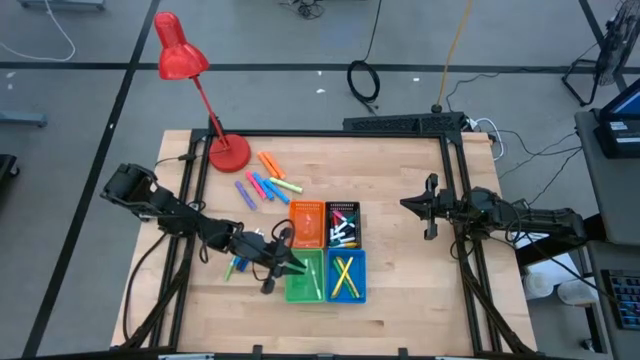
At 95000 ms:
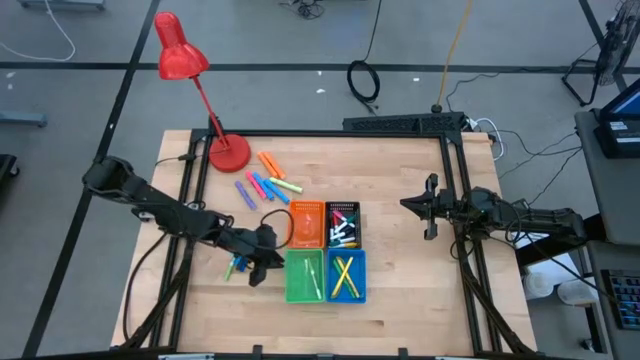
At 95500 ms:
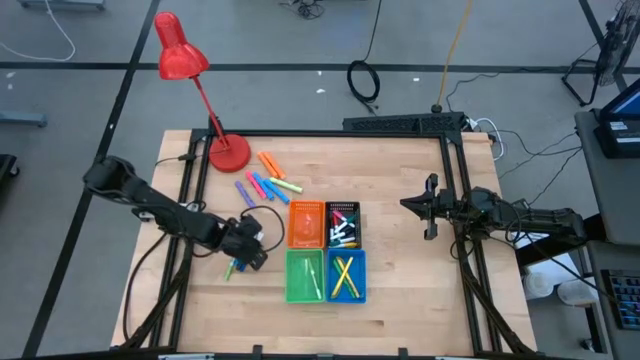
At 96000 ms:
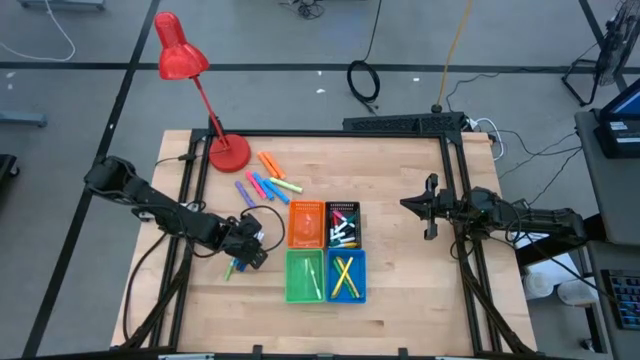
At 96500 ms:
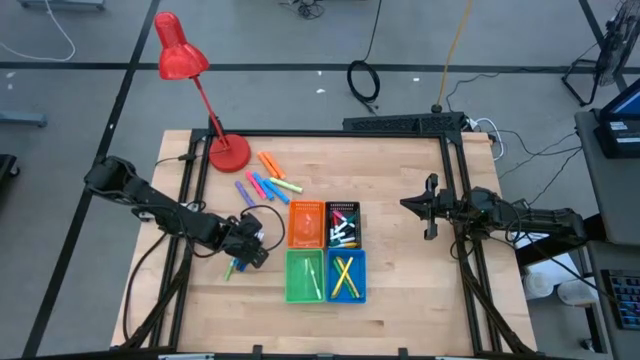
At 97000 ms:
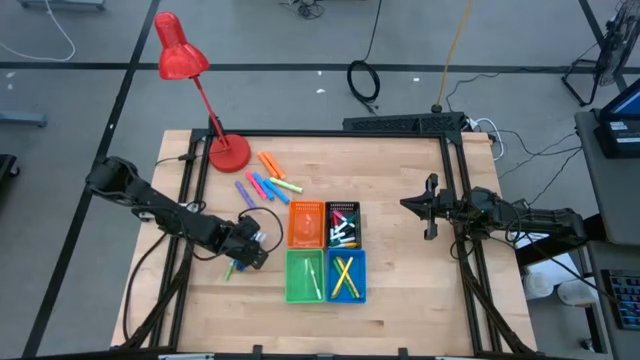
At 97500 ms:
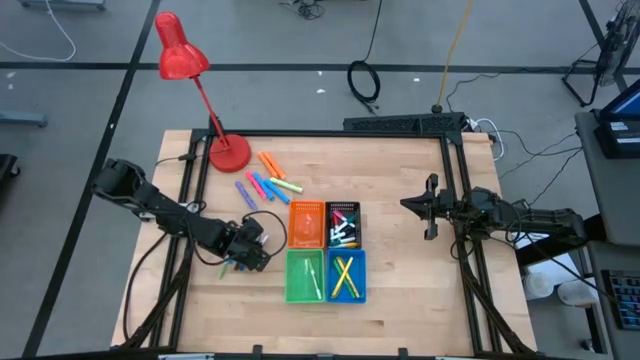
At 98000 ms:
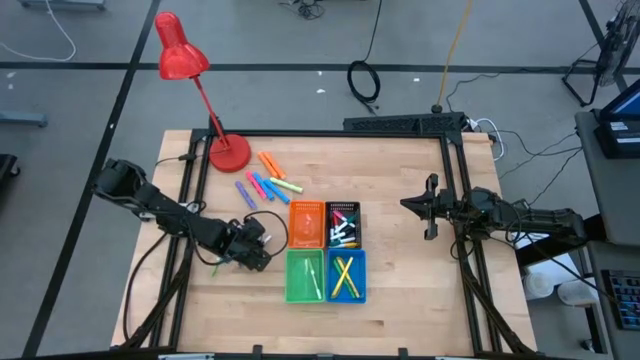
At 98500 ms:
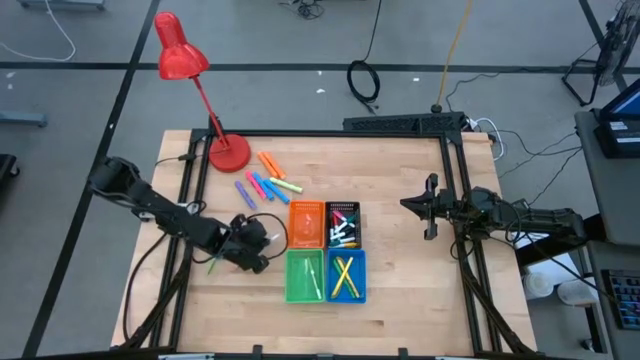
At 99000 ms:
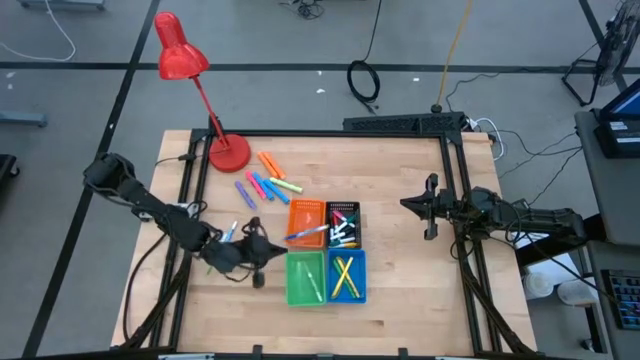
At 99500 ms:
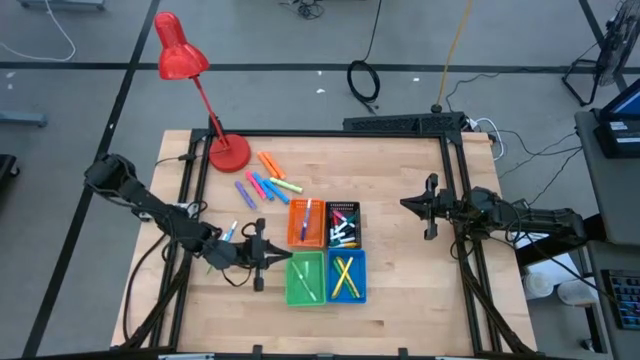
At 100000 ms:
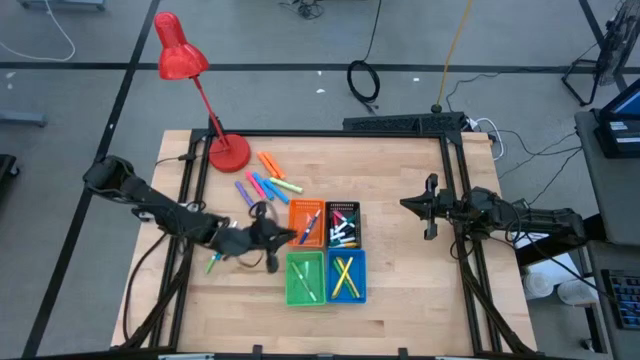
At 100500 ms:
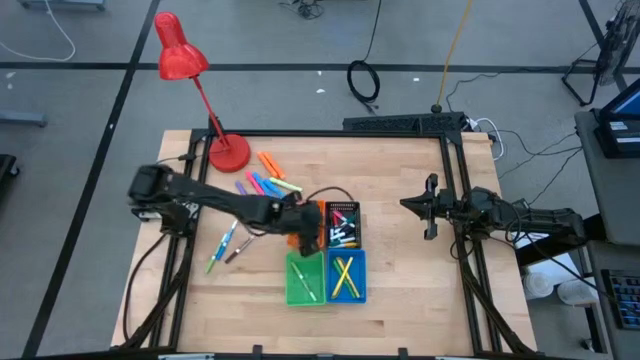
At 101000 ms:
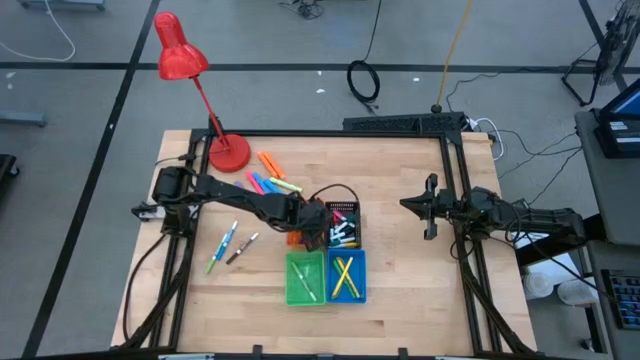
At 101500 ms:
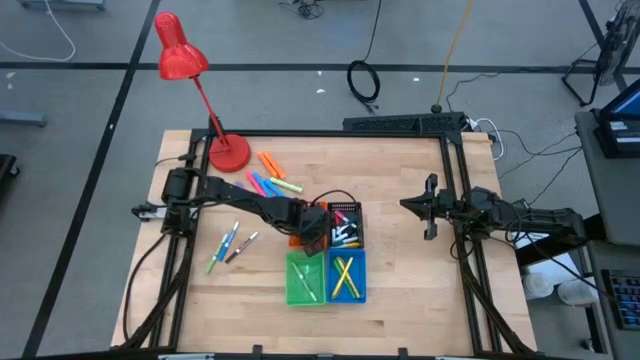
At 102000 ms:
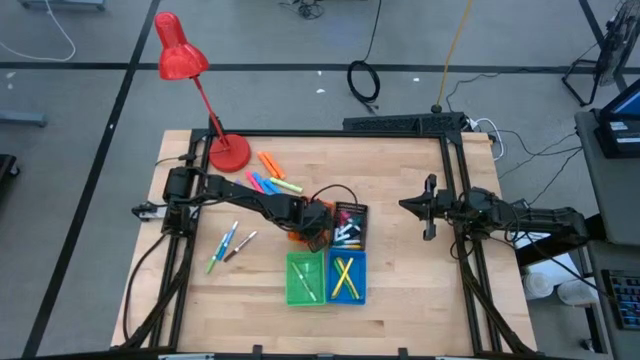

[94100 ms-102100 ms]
Task: Pick & Place Markers
Put the blue marker pen into the green basket

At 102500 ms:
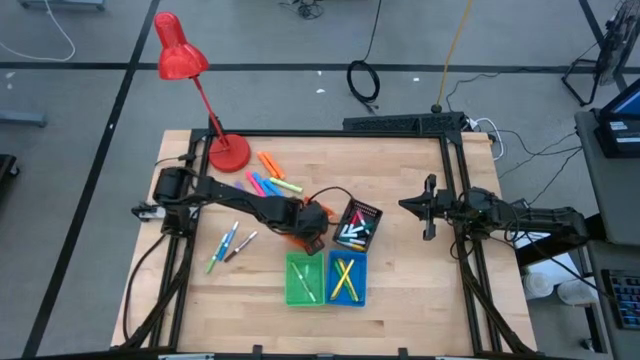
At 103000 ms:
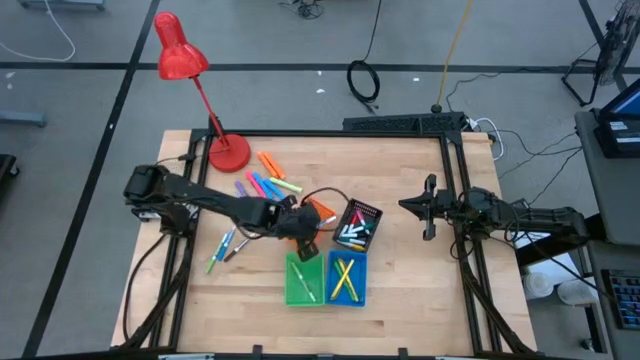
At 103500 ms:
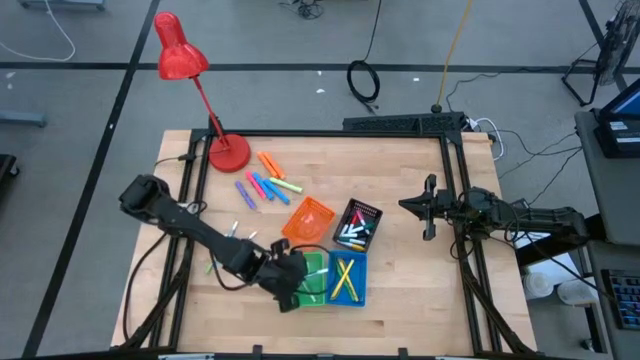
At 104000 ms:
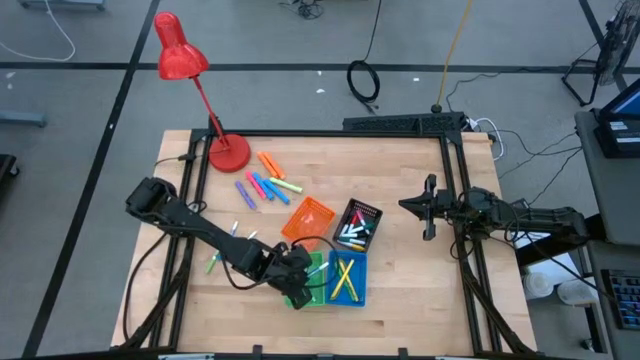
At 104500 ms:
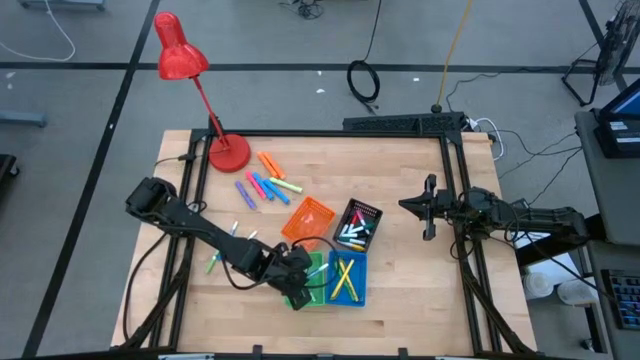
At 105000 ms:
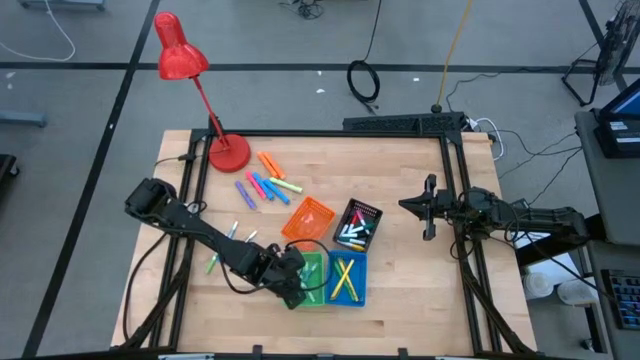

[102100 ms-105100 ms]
Put the blue marker pen into the green basket

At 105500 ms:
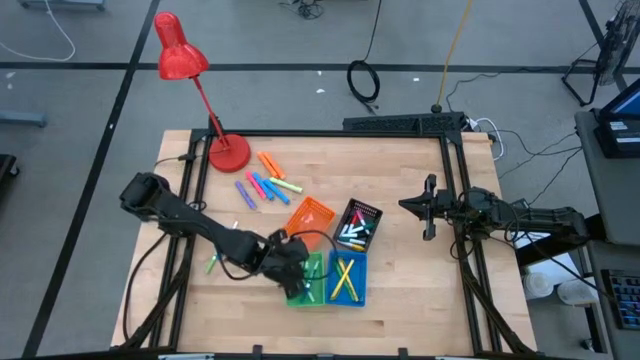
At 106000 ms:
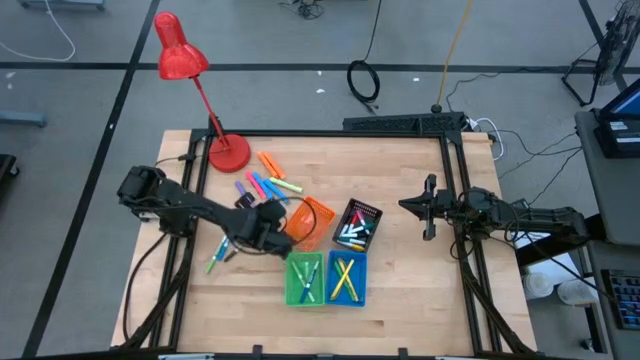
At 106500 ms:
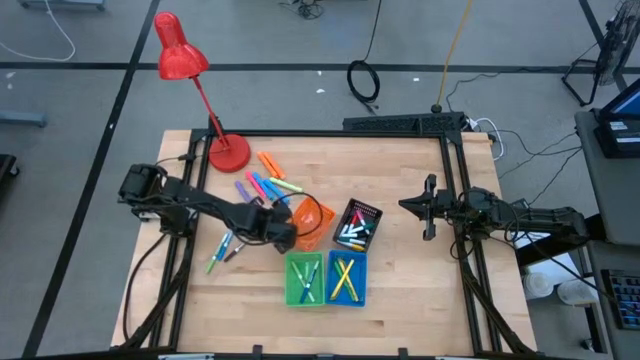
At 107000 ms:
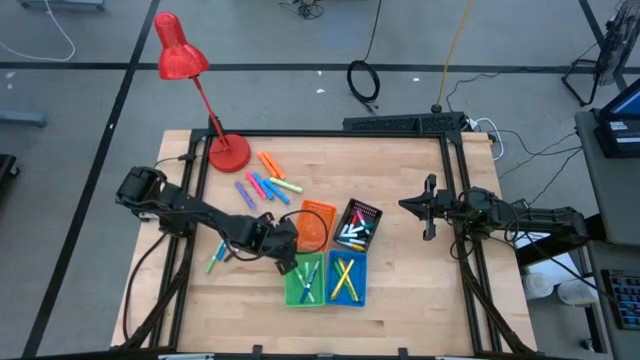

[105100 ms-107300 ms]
Adjust the orange basket

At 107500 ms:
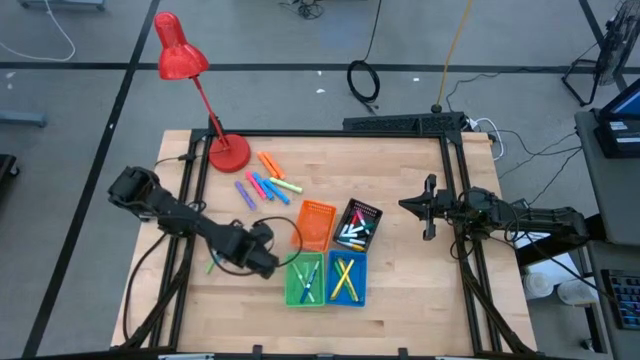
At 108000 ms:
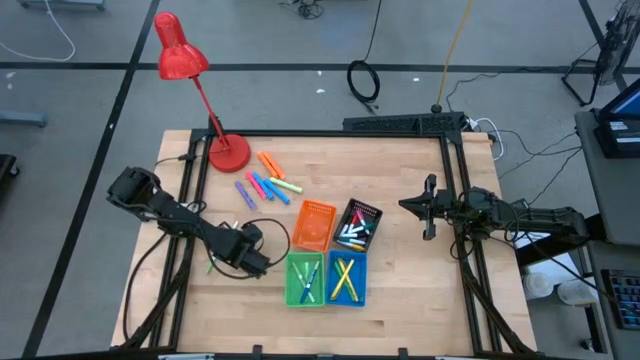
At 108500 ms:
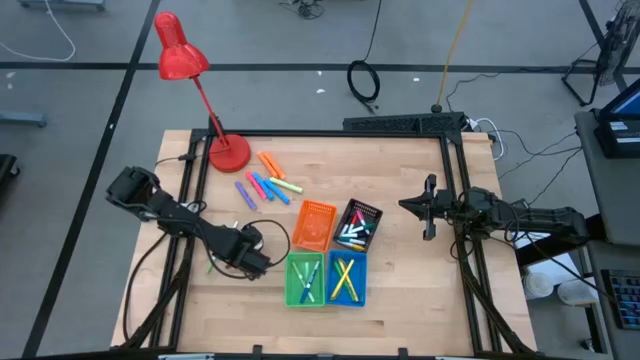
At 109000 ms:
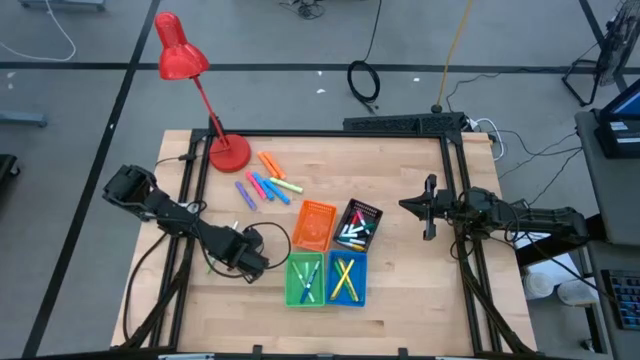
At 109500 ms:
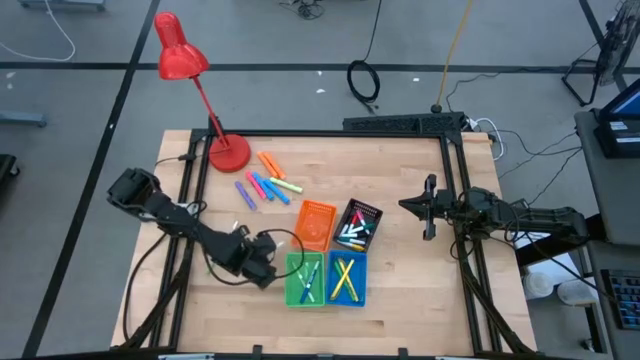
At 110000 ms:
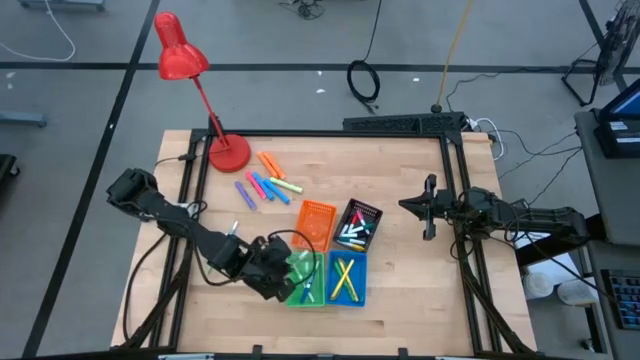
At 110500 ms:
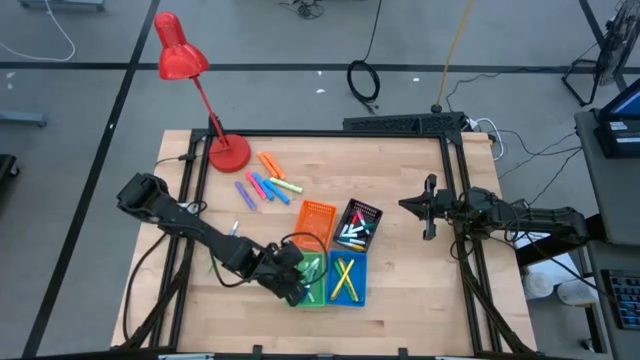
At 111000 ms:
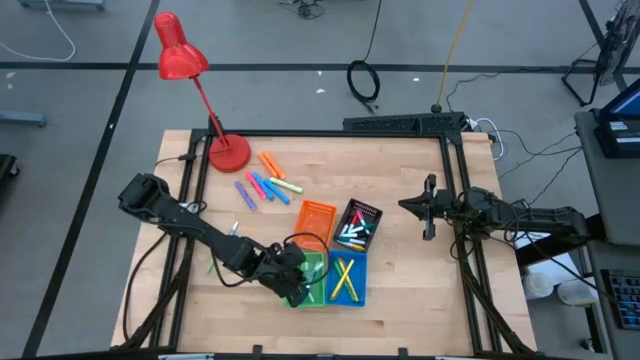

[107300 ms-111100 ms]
Put the brown marker pen into the green basket

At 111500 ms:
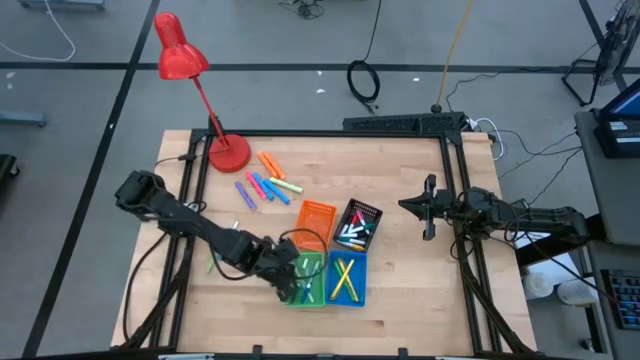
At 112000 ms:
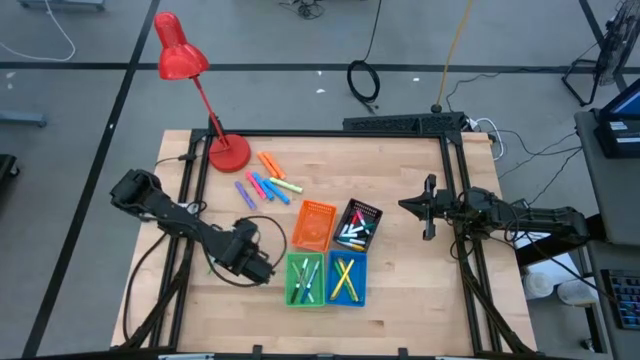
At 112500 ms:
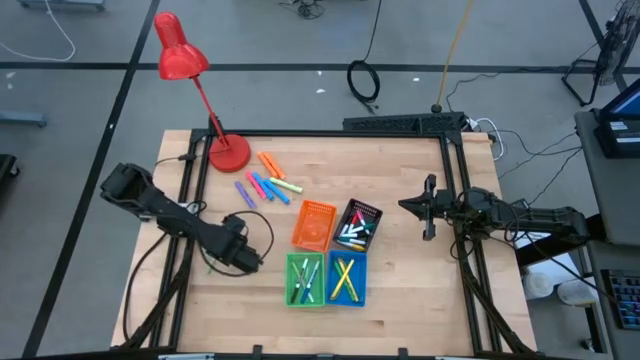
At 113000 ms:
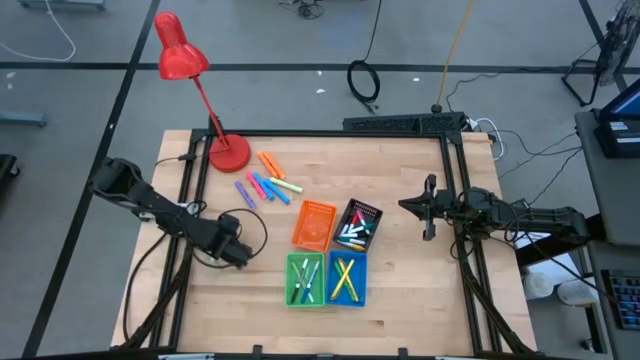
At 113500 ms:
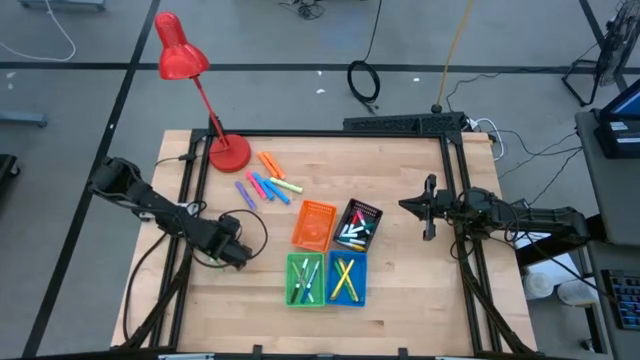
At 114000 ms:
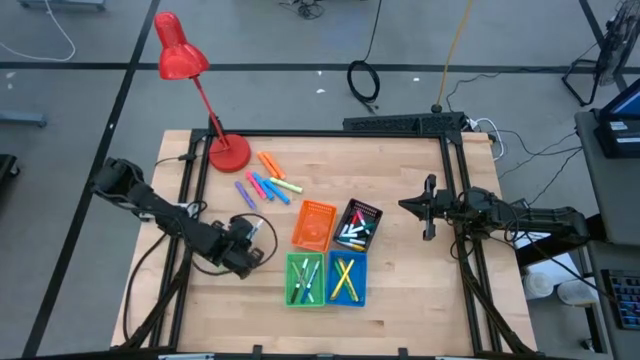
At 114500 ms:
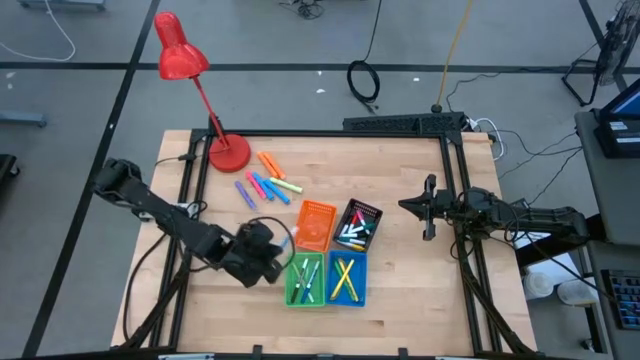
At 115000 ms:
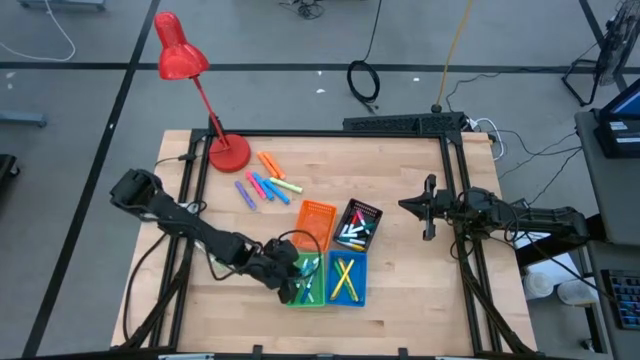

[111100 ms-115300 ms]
Put the light blue marker pen into the green basket

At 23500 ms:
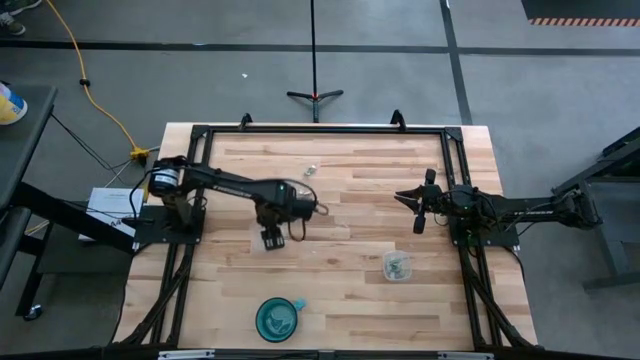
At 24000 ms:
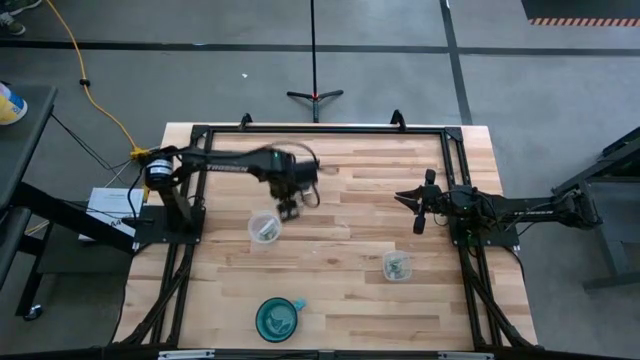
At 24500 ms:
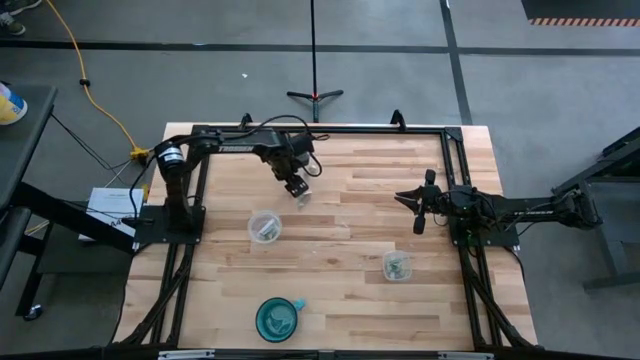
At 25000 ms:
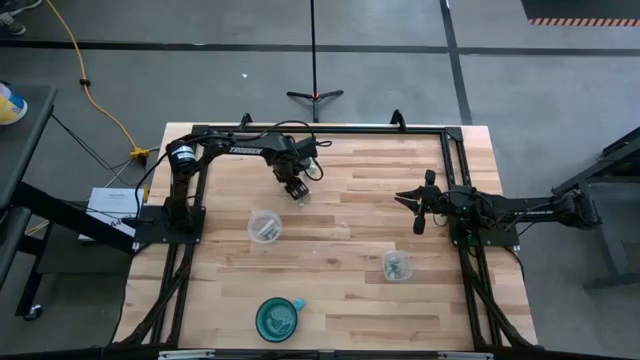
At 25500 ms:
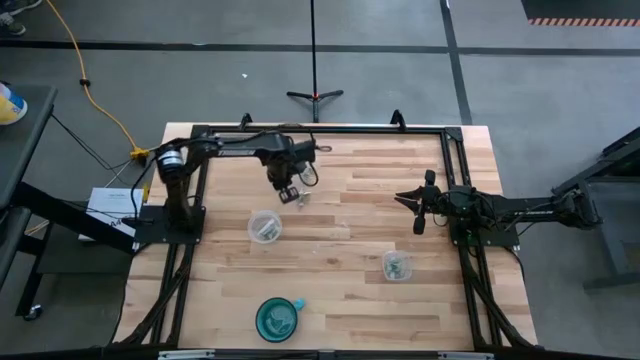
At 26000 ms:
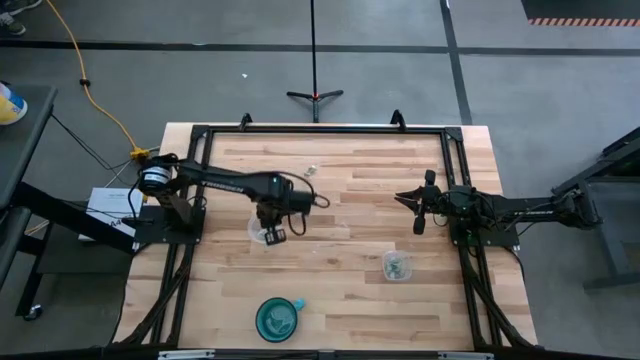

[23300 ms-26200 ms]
Task: Sort candy
Put the green candy into the circle transparent bin
